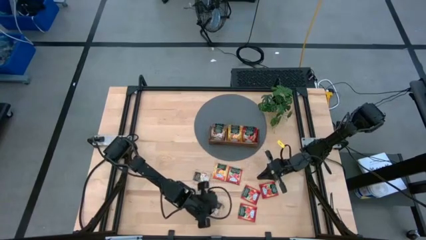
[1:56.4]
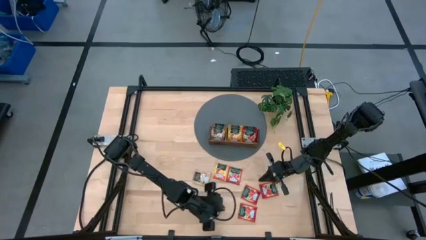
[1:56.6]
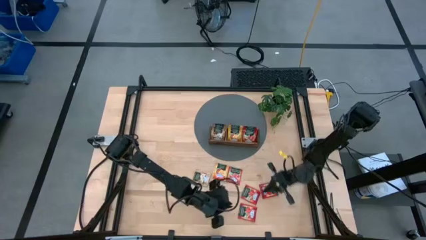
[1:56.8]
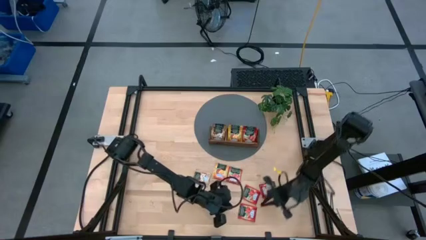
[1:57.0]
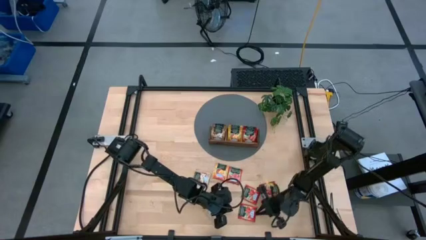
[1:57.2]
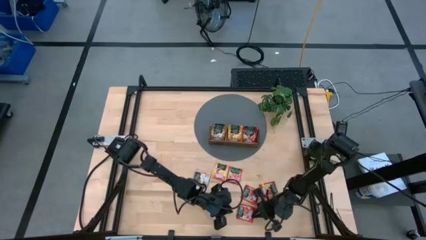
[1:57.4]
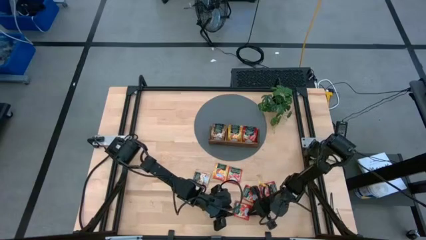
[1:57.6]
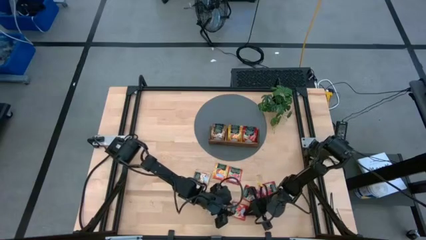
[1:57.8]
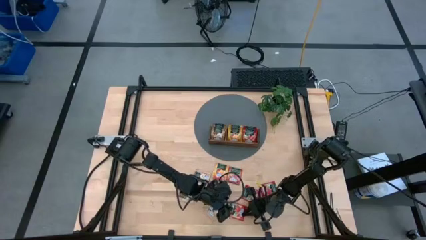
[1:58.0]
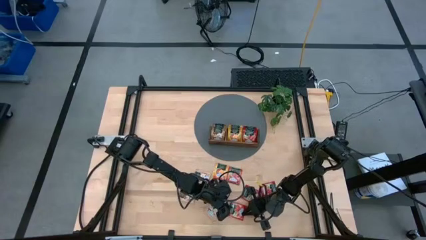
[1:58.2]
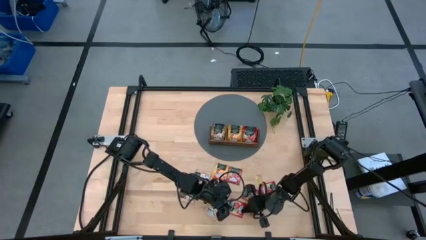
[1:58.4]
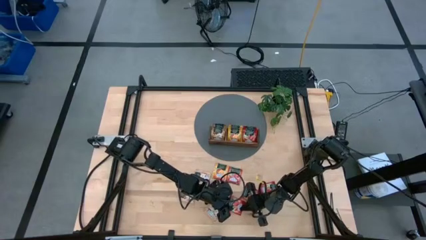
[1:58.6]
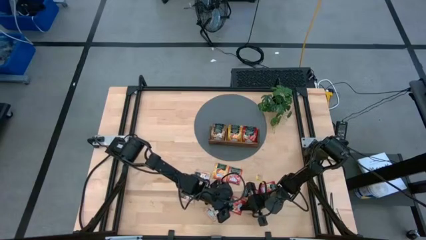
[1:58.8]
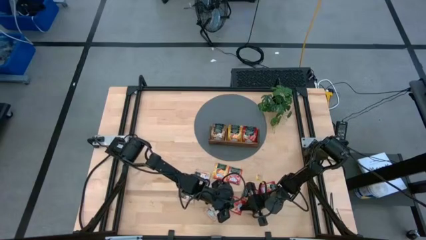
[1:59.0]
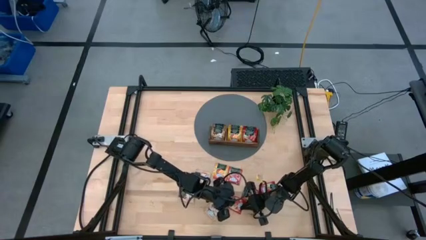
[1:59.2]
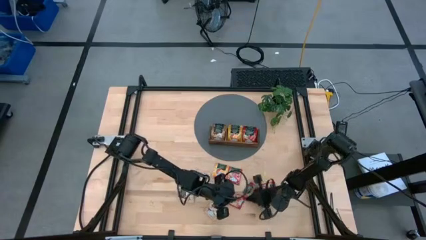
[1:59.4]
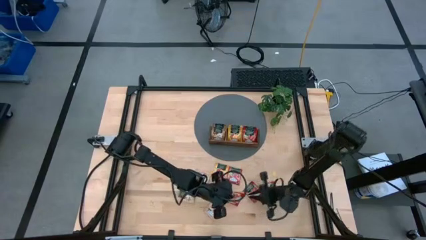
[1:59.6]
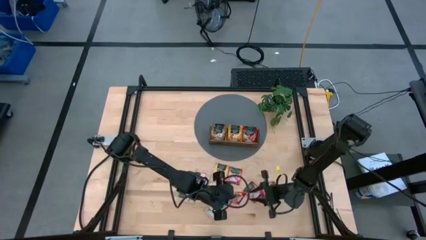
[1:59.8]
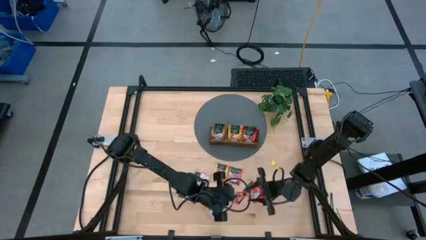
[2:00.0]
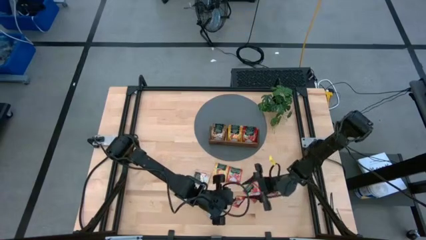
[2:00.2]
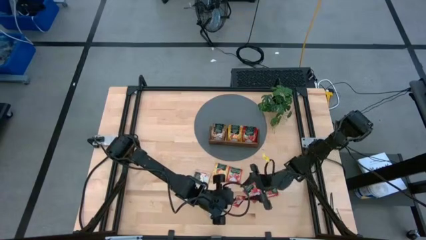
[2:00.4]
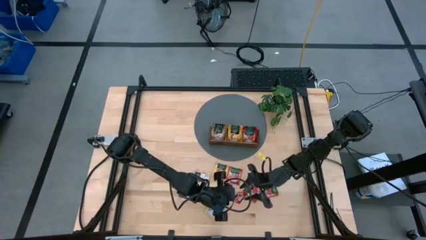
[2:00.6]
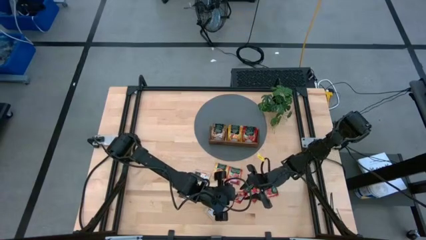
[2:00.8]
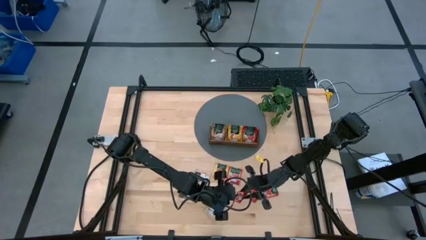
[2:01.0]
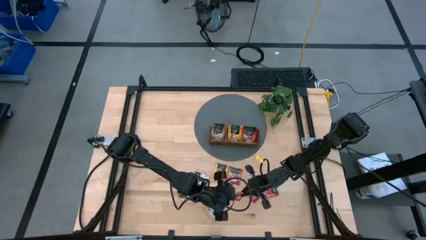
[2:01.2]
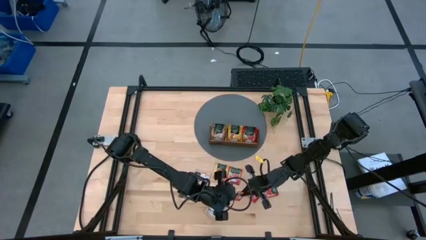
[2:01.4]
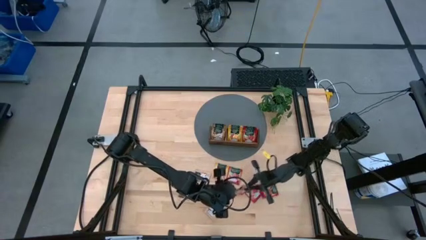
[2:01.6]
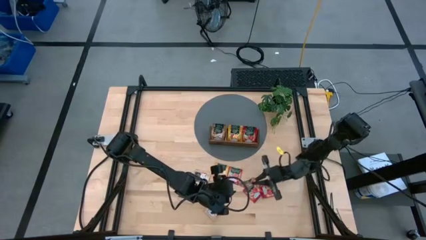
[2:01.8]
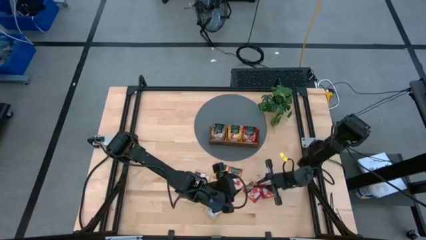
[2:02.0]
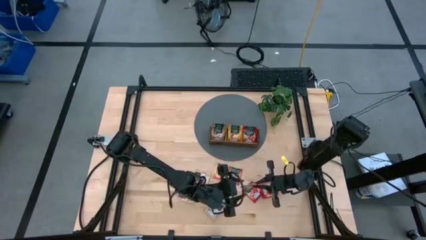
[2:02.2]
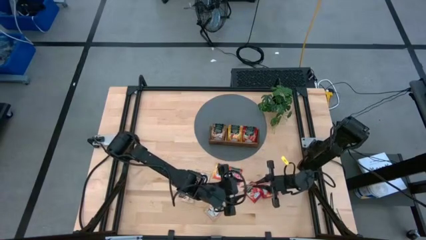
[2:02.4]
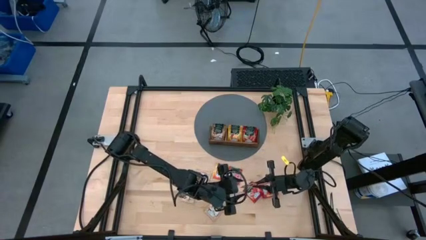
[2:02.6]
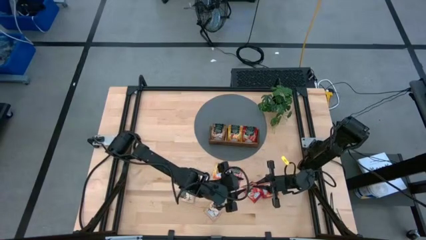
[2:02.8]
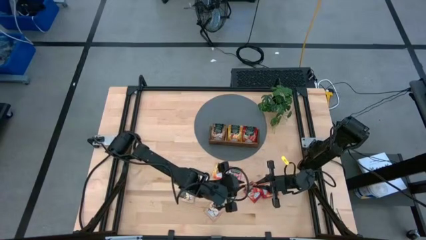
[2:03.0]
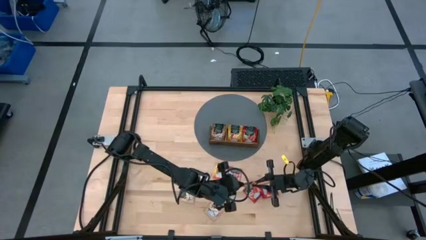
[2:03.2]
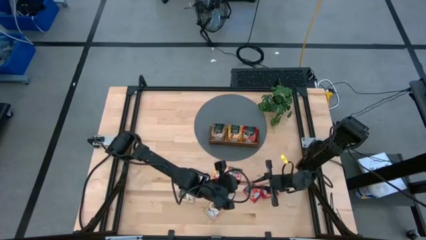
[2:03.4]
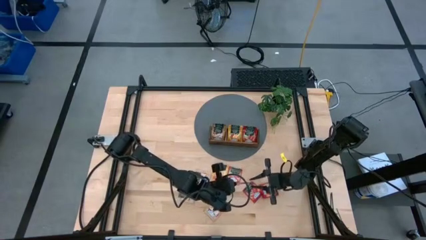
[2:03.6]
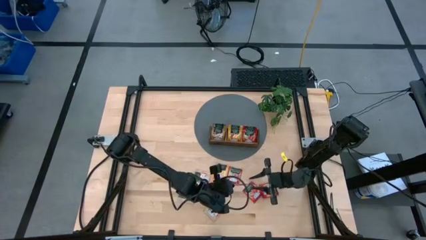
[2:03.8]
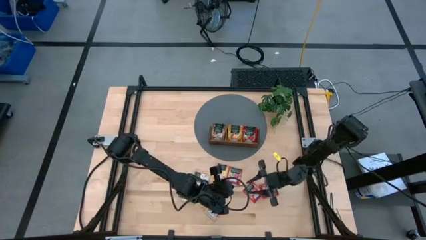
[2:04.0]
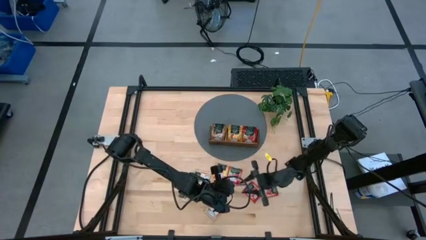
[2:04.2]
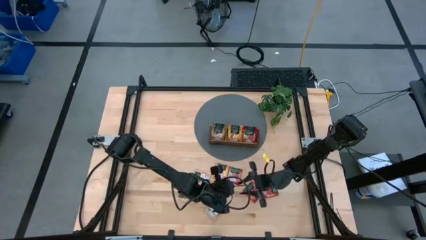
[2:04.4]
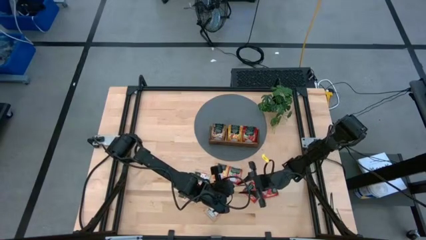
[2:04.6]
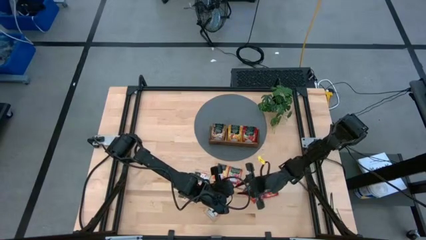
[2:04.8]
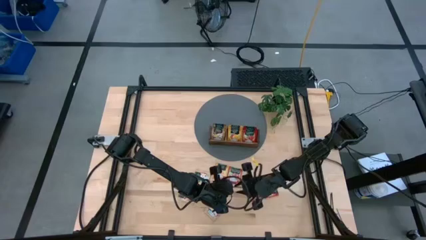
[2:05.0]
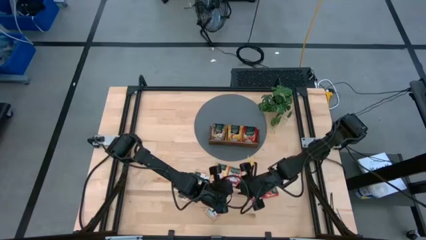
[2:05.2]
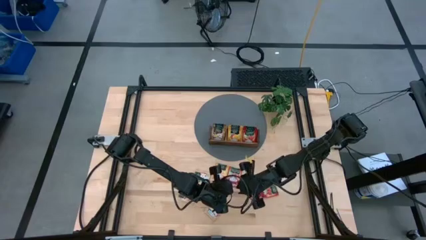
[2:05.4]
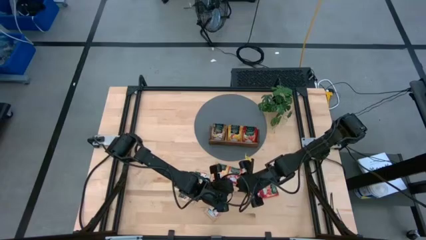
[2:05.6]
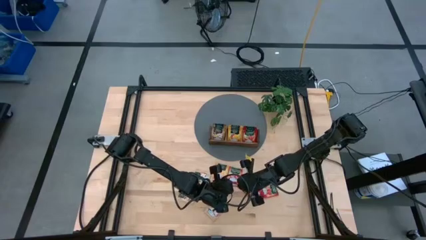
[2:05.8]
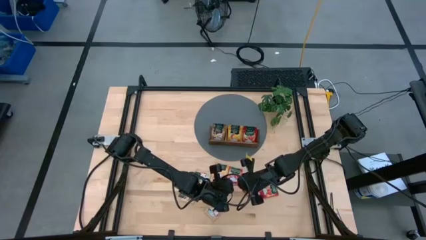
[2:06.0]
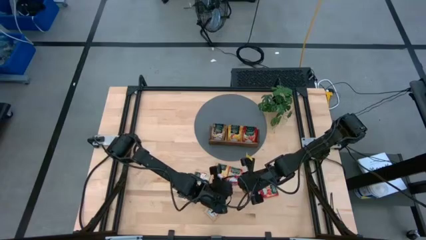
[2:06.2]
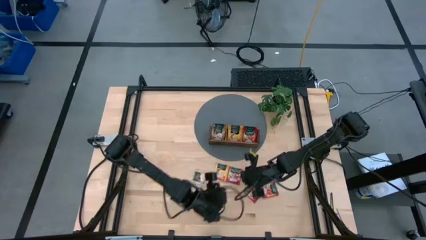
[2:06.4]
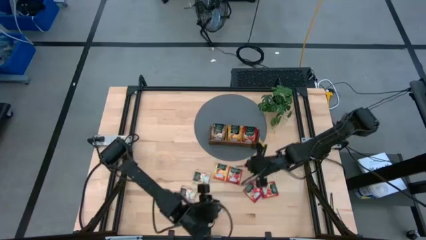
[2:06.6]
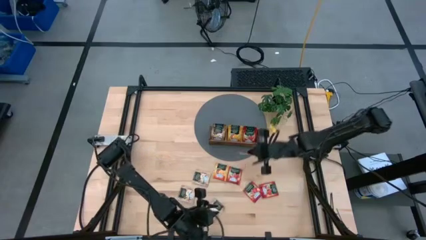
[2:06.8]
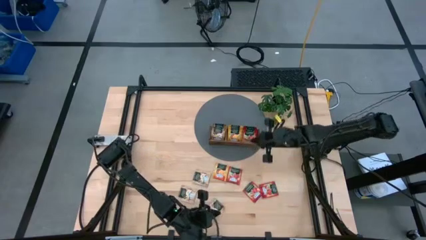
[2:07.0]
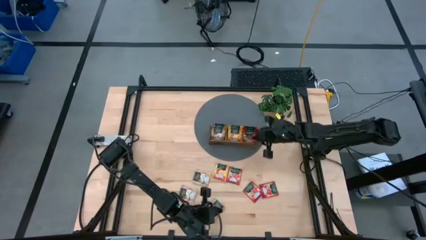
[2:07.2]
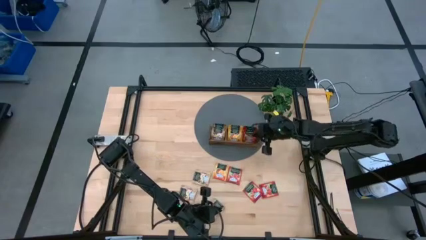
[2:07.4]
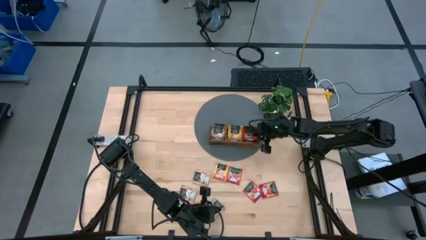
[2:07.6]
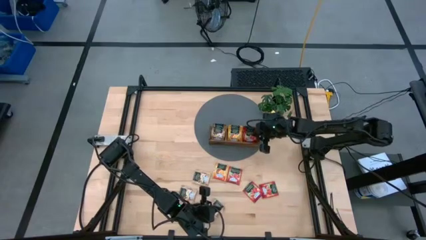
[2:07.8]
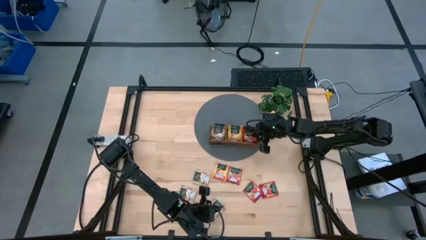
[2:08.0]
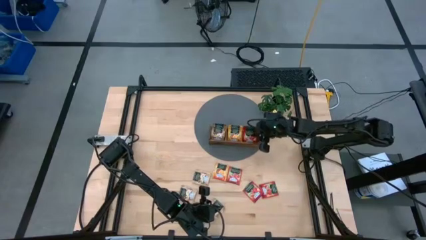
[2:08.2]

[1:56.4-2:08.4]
Task: Pick & Place Tea
Put the red tea bag into the right section of the wooden organizer

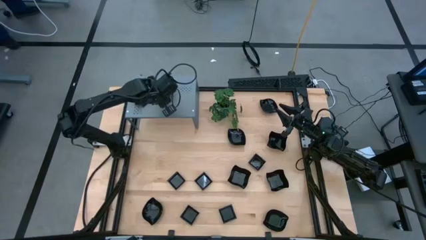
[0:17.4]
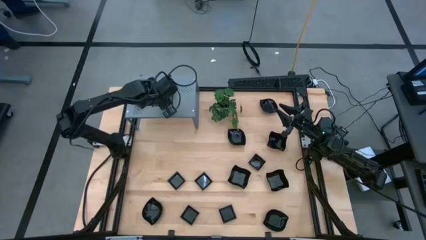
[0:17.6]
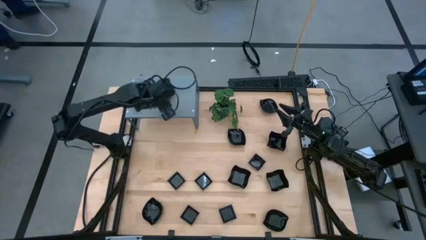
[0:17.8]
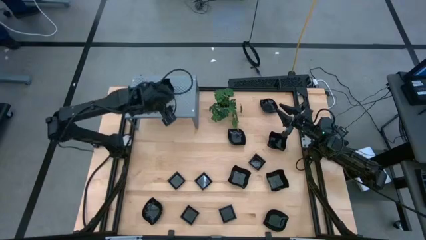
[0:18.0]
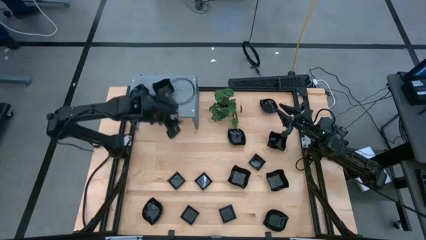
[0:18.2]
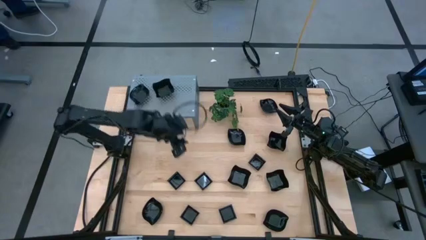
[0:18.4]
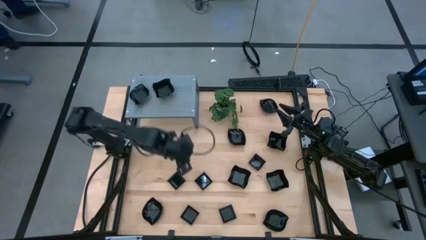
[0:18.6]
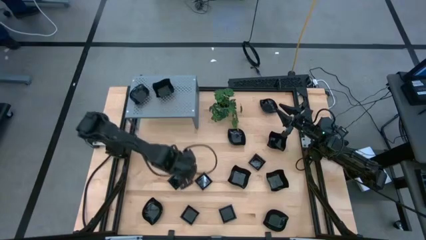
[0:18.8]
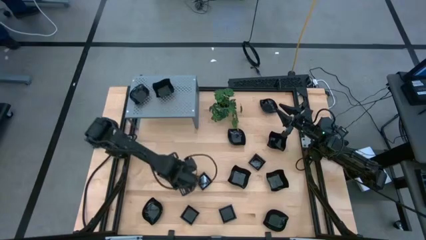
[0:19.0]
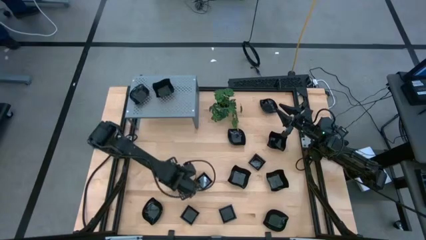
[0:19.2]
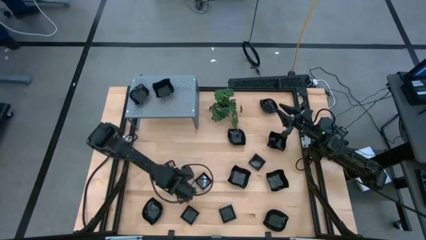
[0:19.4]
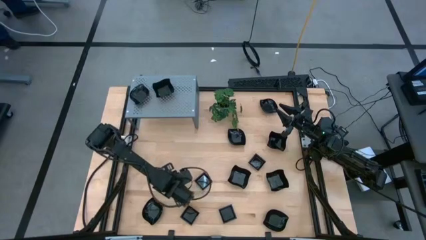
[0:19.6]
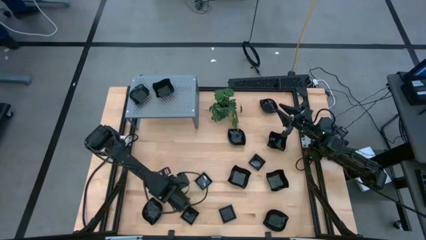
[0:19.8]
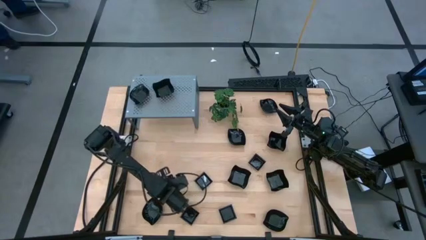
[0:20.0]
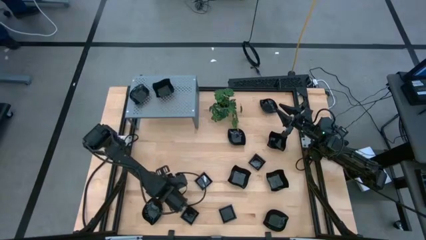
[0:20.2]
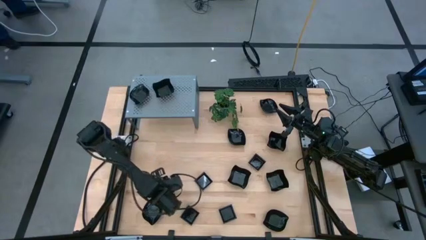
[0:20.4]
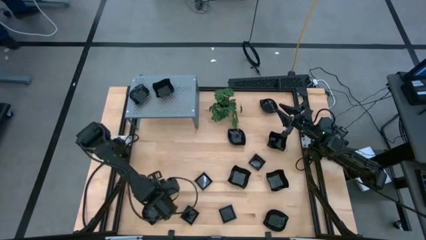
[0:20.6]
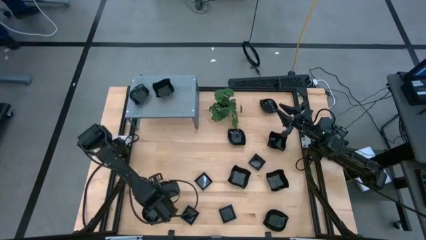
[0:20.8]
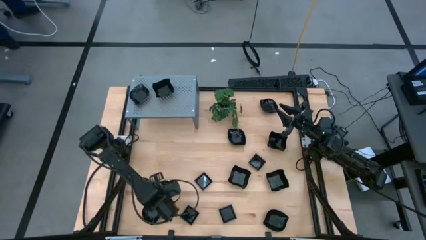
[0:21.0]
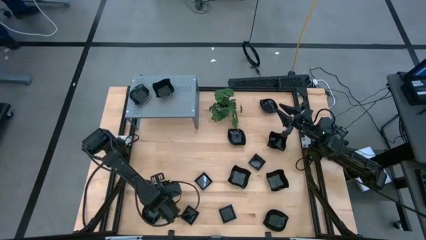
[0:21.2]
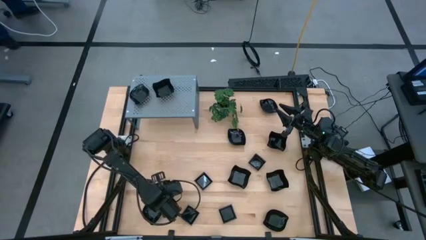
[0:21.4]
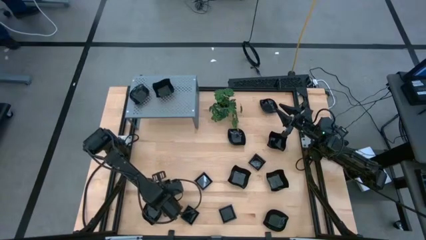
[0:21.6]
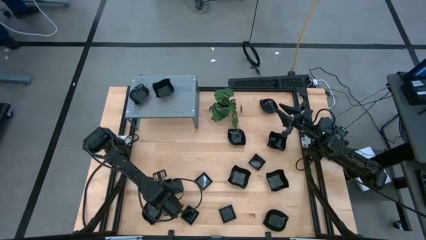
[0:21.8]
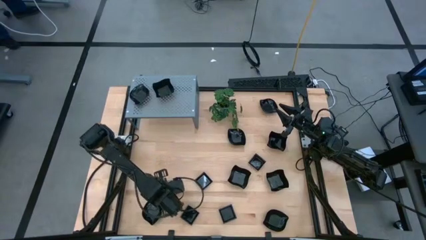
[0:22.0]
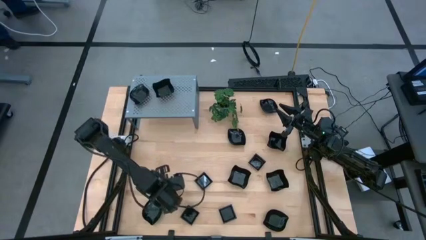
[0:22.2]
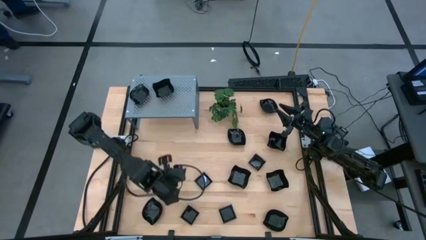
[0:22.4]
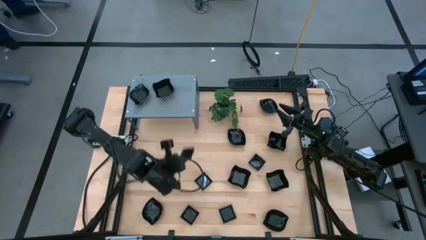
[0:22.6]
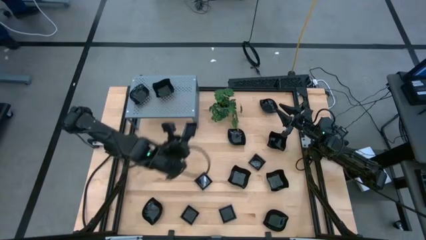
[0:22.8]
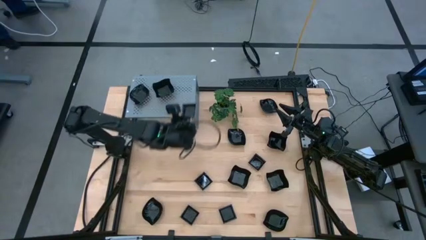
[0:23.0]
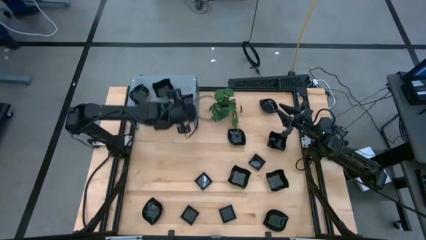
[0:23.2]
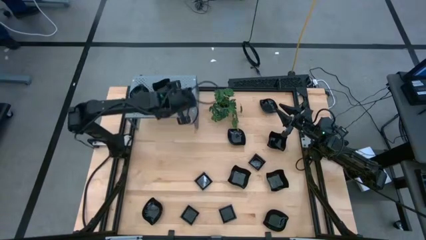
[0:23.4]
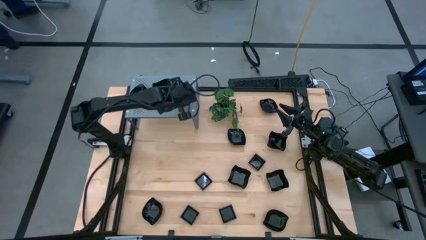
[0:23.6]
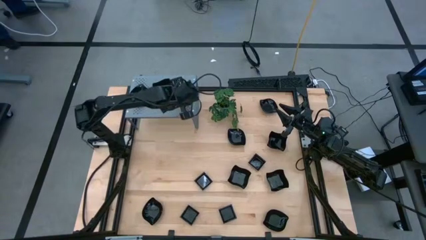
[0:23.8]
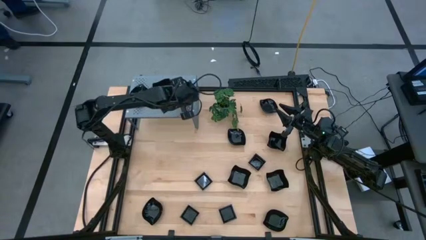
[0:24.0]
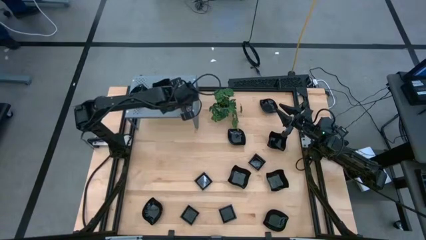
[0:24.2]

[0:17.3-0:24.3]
Task: Pick & Place Mini shaped plates
Put the black square plate on the shelf
